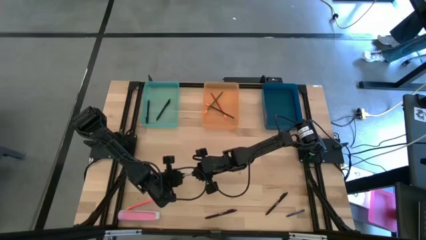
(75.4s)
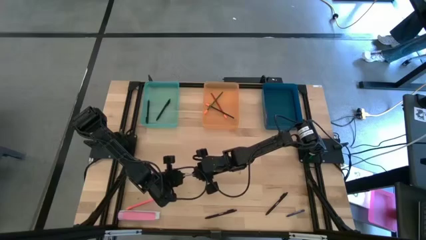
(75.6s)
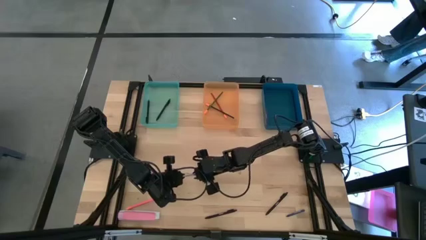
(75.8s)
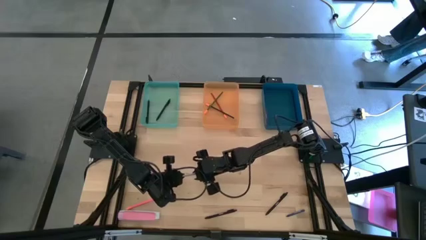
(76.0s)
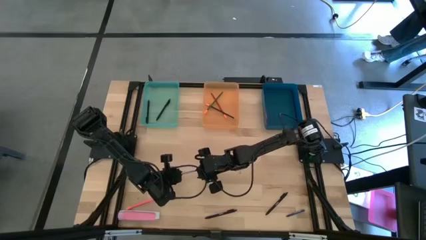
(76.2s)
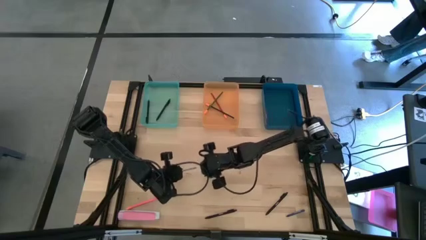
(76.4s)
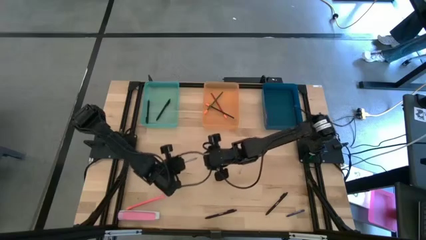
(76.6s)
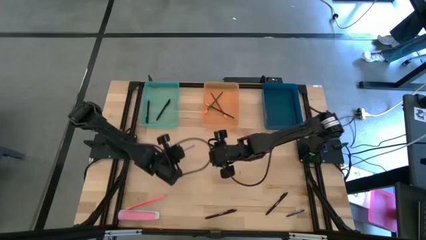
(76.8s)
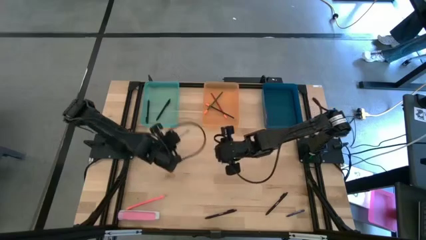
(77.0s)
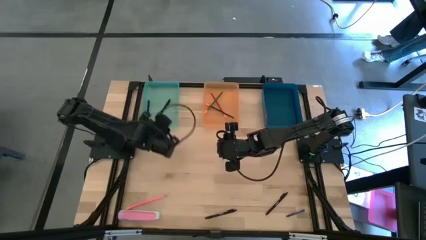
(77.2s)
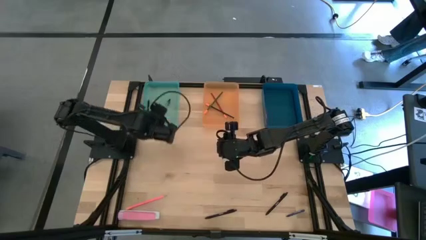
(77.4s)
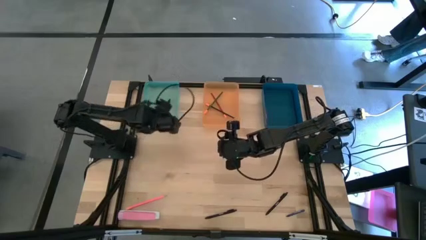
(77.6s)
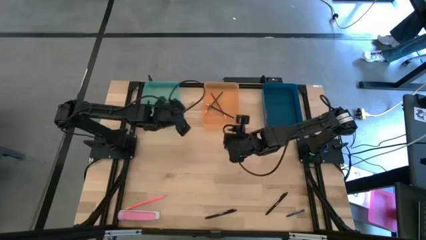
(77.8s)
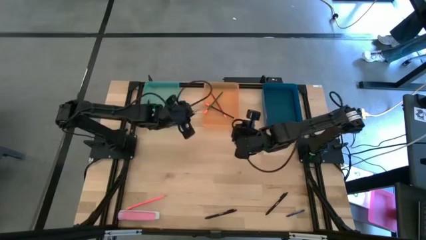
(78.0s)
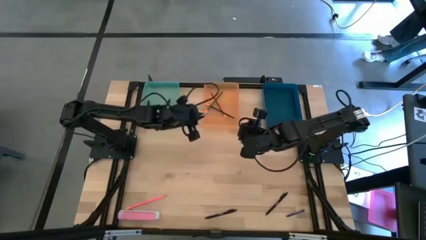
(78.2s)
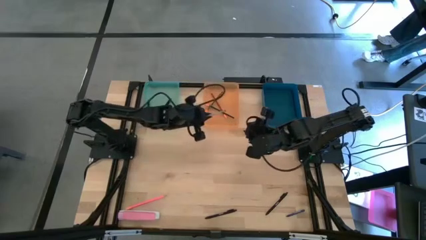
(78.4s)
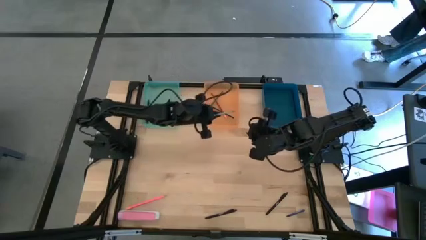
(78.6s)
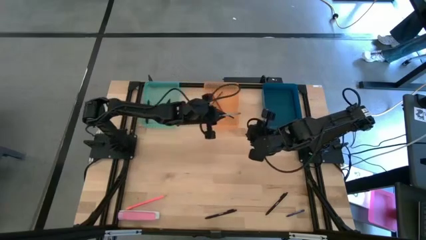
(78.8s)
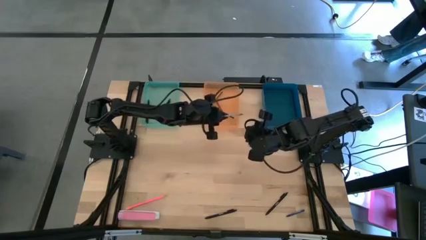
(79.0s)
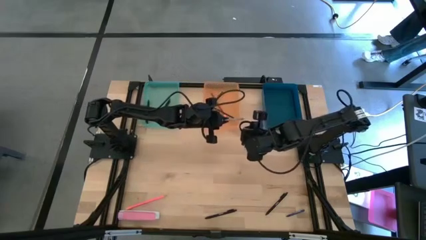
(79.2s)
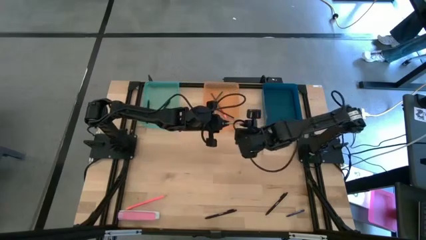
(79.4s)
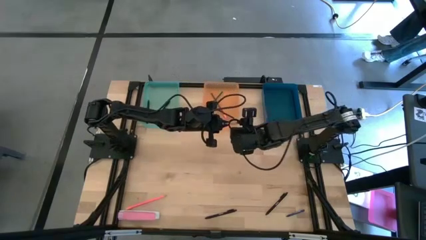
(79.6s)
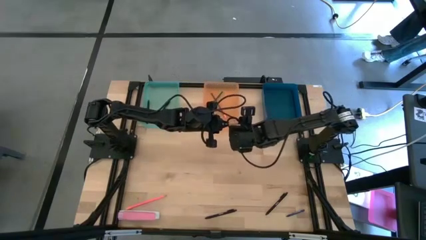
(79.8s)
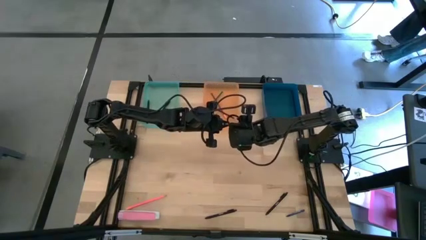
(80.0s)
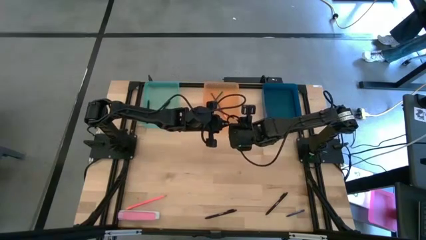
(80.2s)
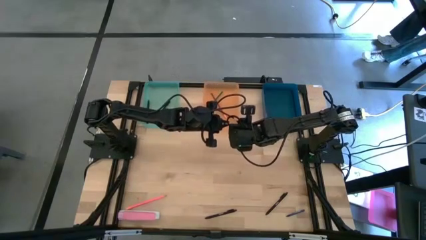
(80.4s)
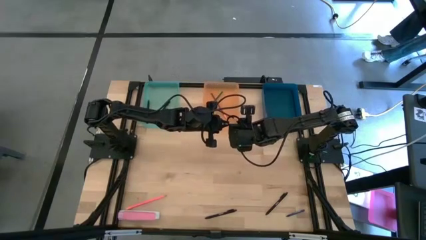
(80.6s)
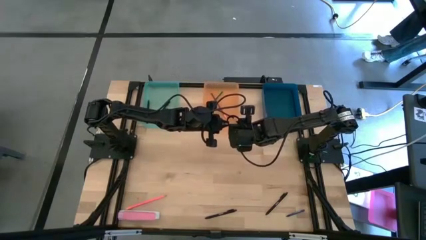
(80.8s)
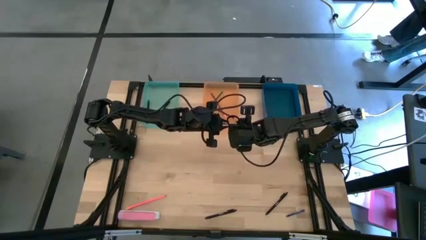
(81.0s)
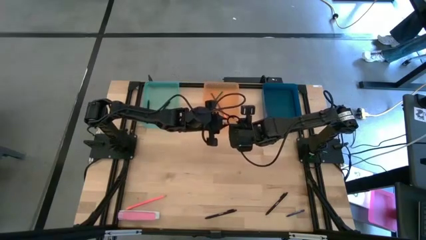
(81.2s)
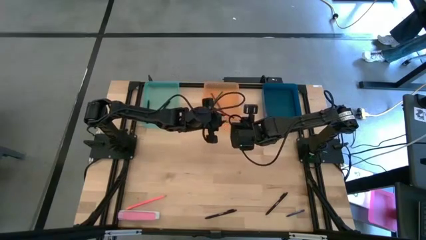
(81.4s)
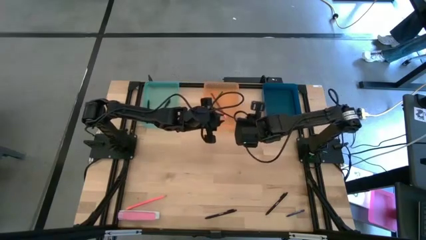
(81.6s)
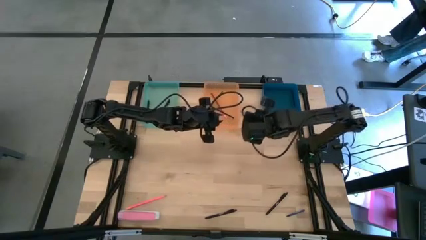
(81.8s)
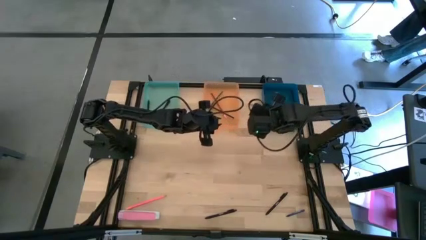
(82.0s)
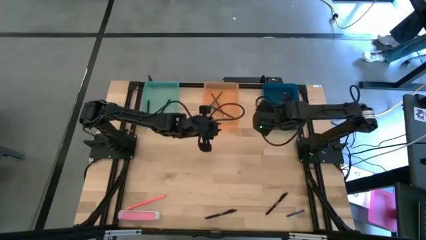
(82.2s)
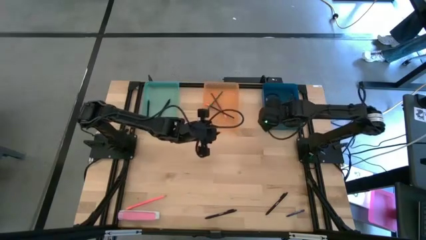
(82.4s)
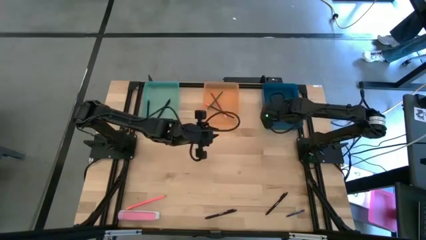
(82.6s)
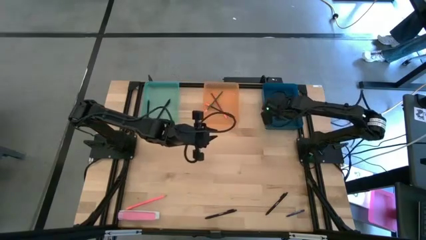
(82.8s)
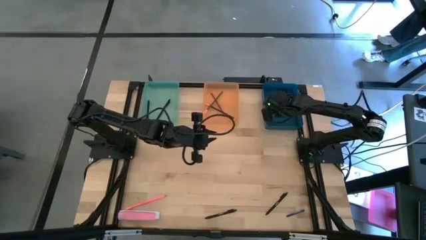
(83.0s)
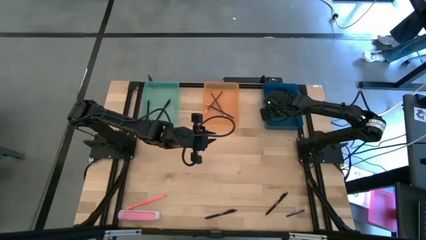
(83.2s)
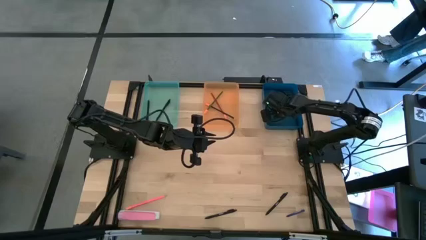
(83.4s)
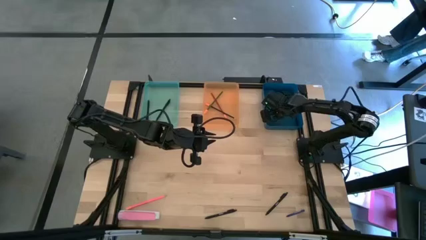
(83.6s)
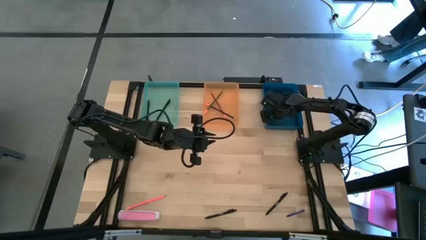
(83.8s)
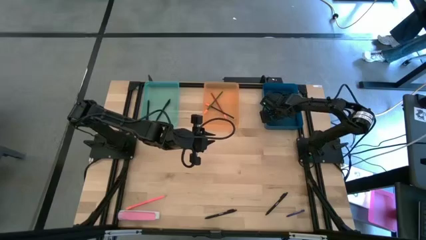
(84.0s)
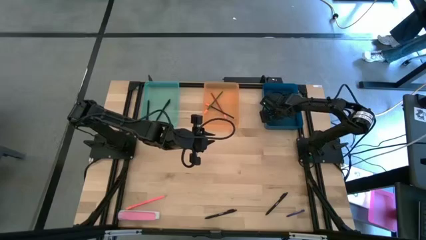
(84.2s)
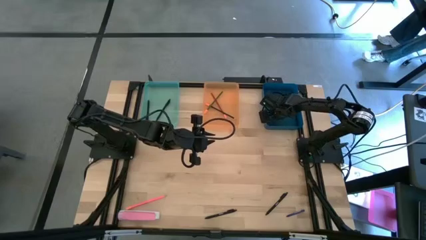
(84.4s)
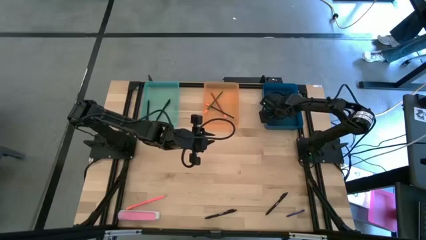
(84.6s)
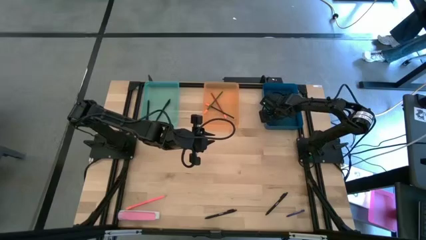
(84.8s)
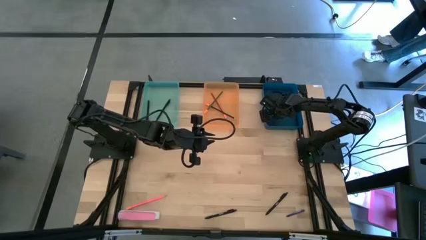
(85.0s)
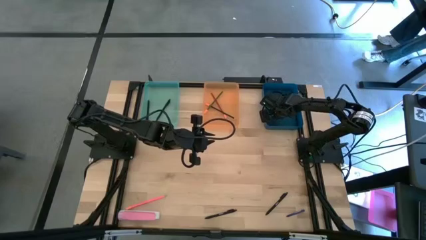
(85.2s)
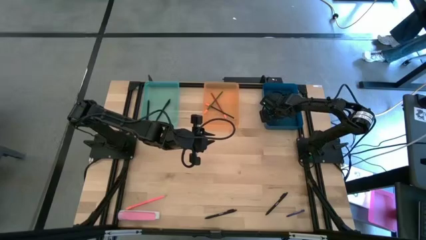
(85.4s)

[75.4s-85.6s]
Task: Sort crayons/erasers/pens/pencils in bins
Put the gray crayon into the blue bin

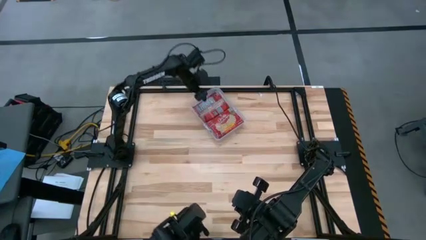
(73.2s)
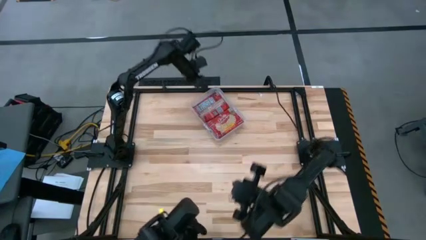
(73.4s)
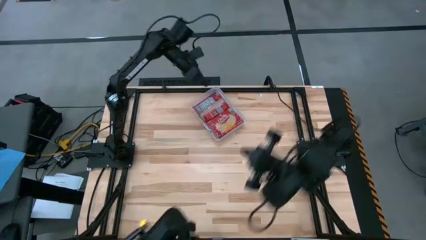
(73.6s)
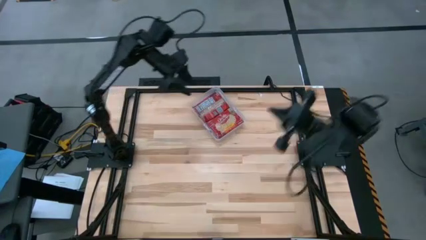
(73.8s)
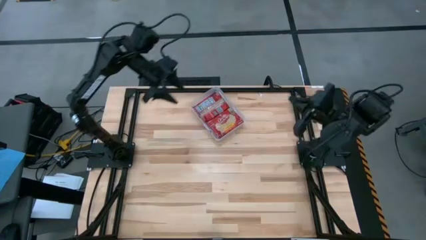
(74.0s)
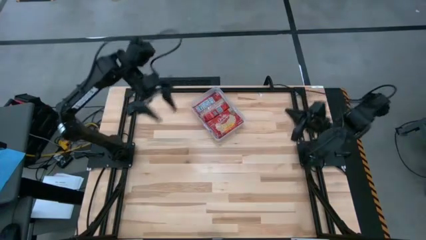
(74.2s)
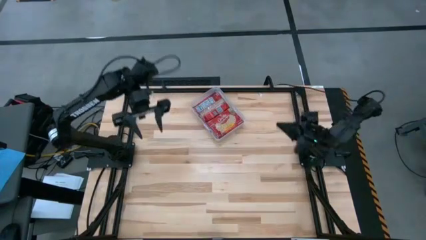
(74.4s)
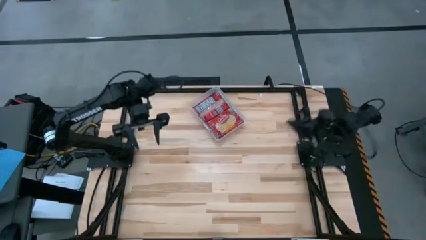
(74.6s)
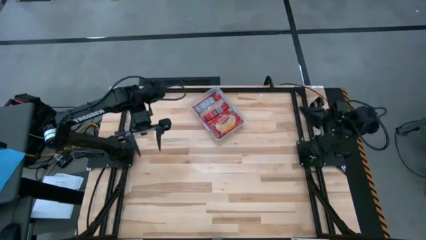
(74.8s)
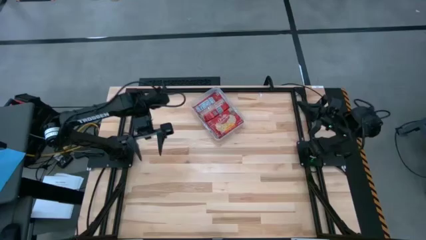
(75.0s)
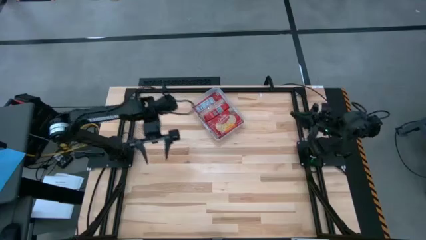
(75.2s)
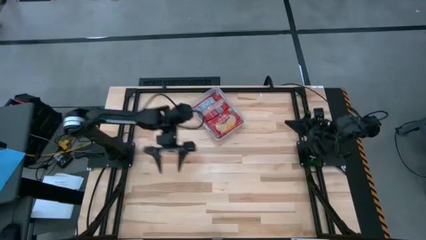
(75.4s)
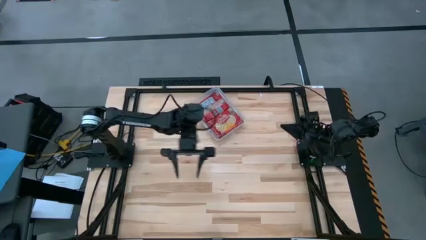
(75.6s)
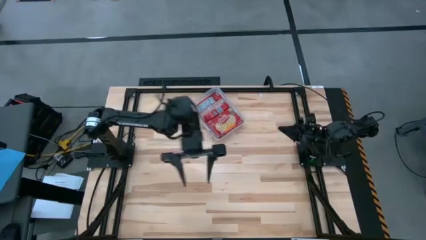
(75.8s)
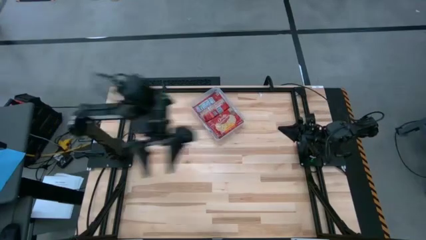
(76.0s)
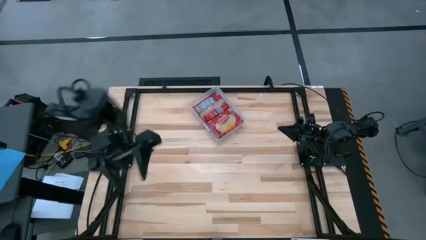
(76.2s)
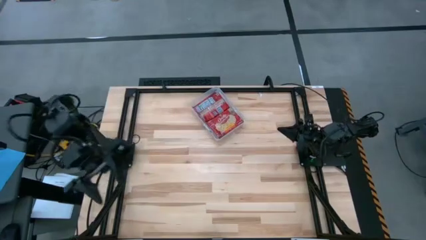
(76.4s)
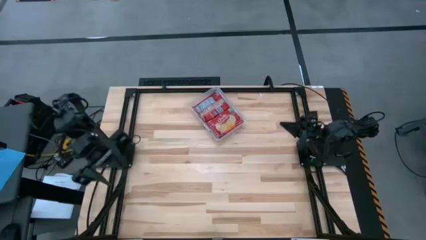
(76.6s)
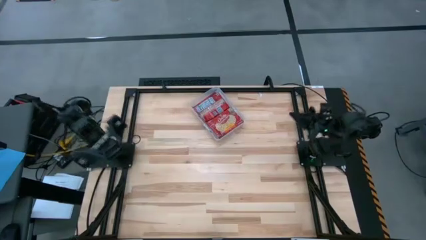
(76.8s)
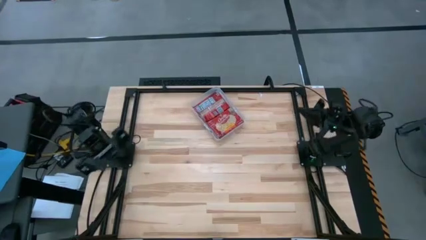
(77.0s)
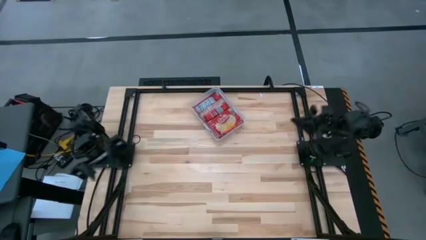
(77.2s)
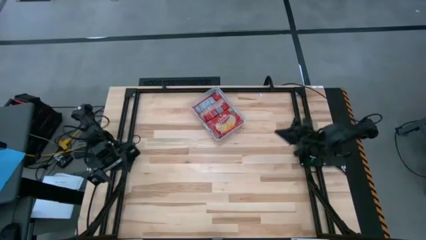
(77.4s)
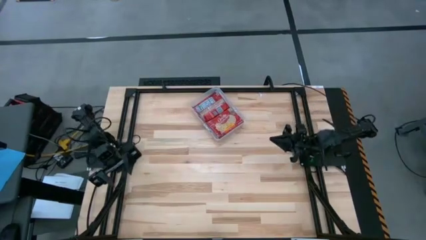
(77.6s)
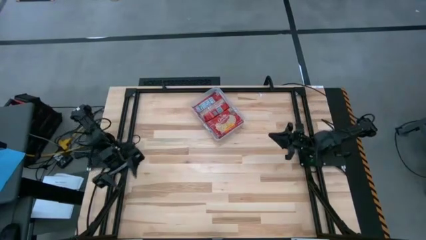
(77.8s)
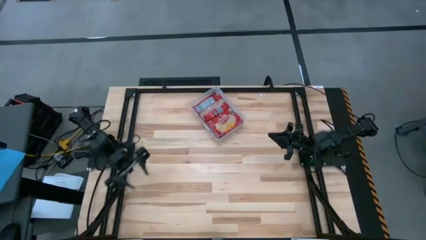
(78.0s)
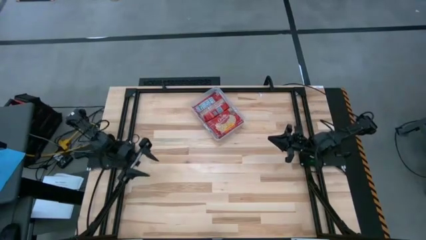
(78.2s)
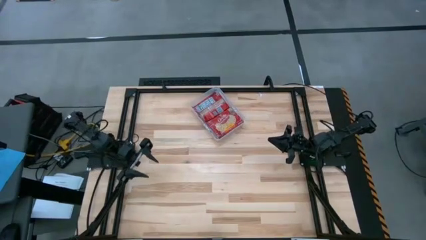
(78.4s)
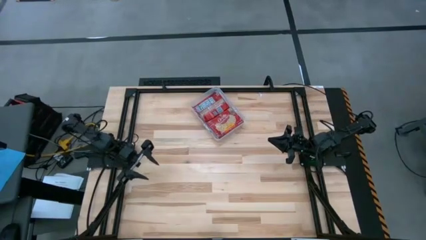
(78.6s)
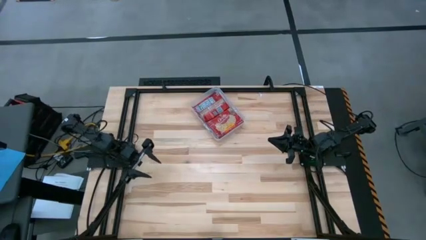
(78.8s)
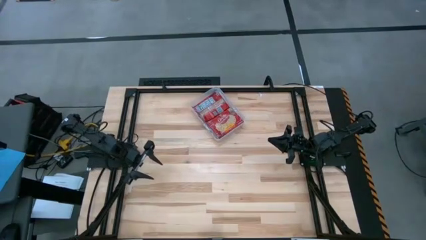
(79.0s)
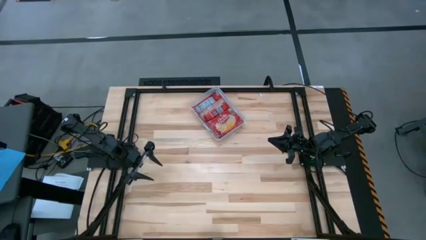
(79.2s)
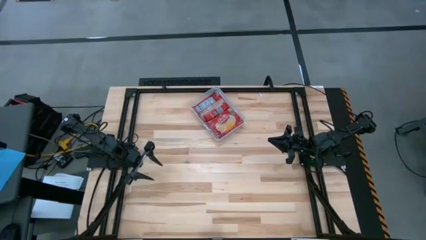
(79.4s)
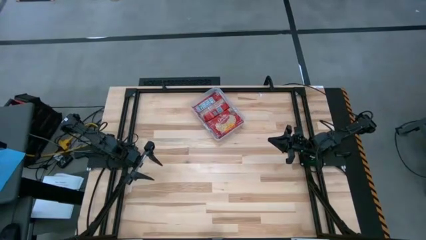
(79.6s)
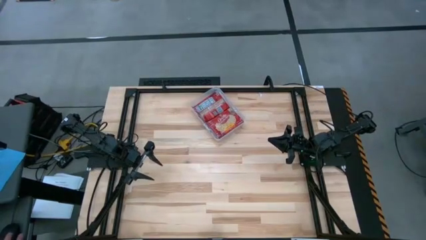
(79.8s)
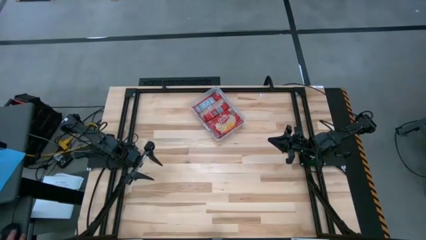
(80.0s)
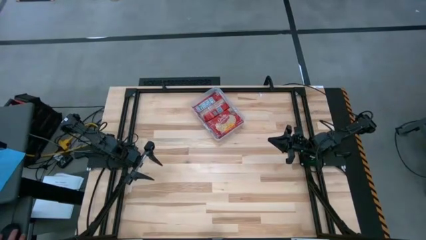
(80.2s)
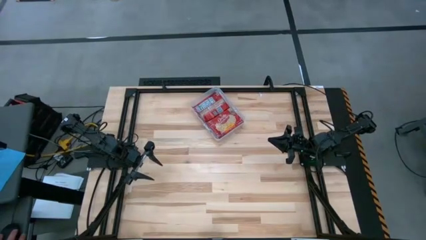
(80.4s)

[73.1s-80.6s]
Task: Sort popcorn bags into baskets
Return to Home Position
